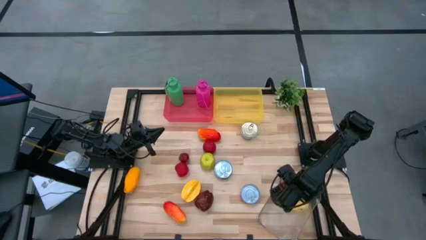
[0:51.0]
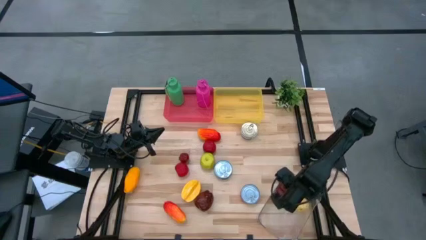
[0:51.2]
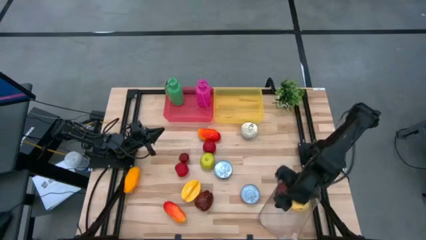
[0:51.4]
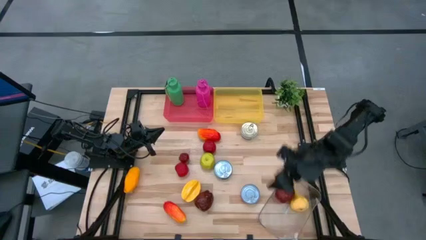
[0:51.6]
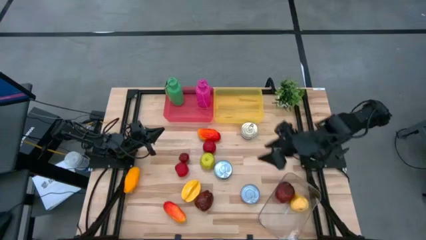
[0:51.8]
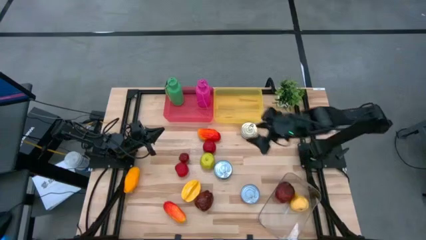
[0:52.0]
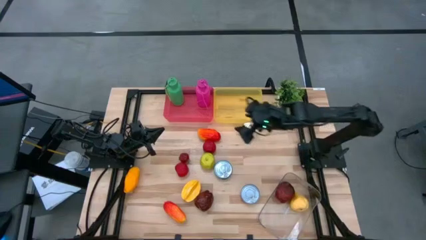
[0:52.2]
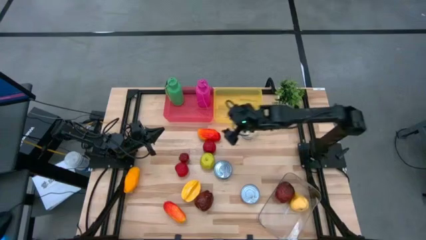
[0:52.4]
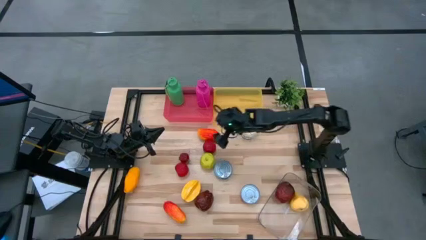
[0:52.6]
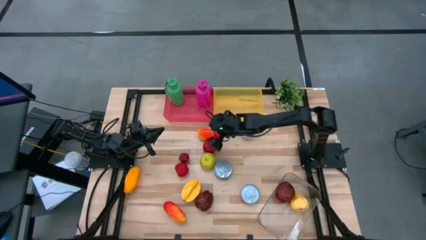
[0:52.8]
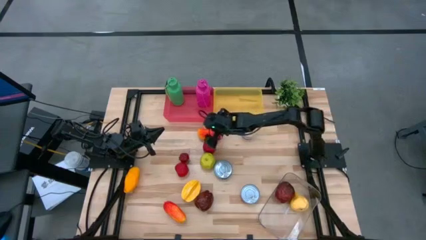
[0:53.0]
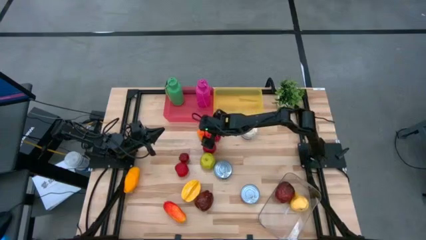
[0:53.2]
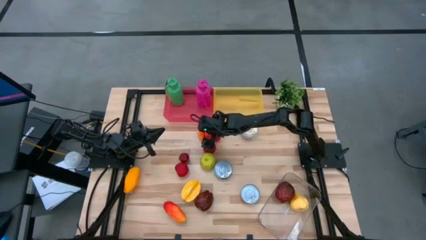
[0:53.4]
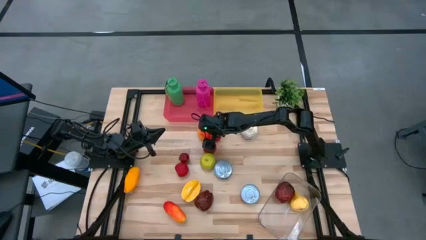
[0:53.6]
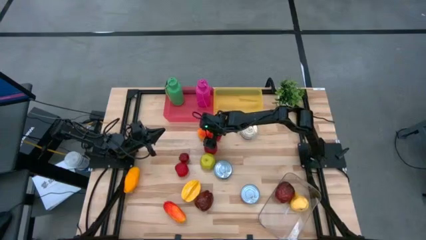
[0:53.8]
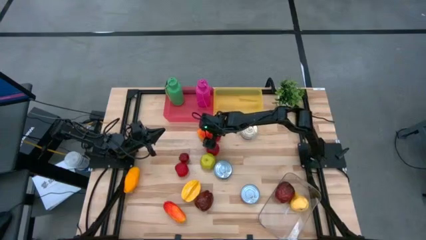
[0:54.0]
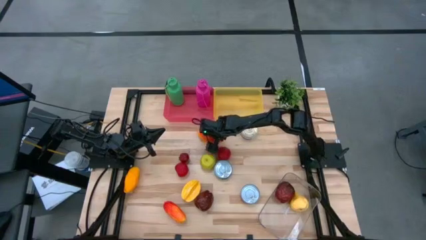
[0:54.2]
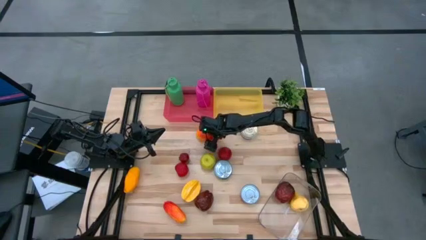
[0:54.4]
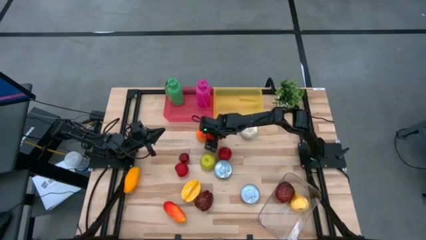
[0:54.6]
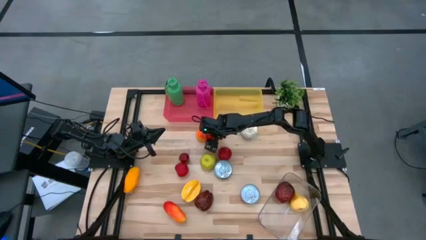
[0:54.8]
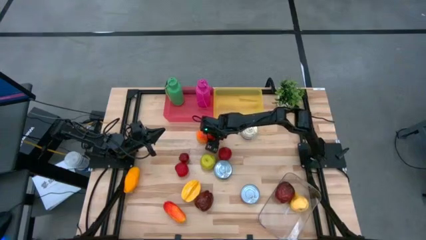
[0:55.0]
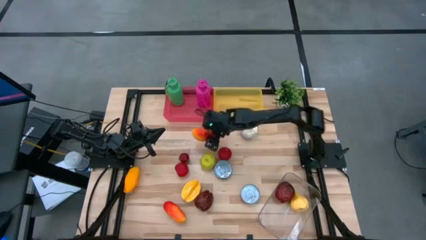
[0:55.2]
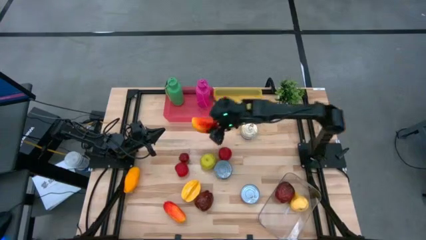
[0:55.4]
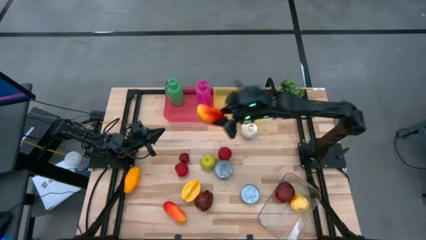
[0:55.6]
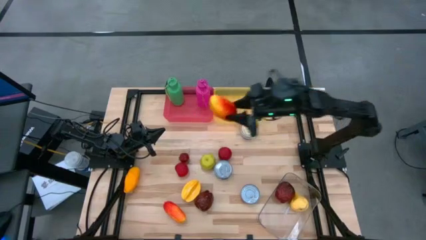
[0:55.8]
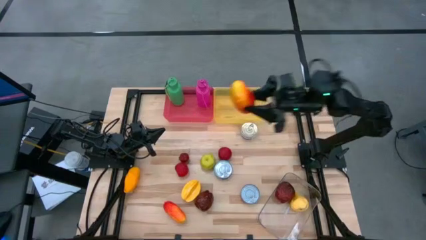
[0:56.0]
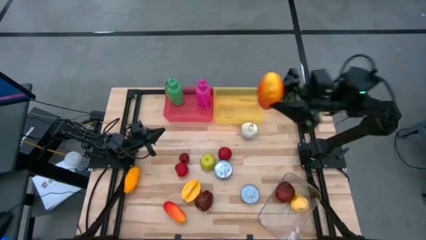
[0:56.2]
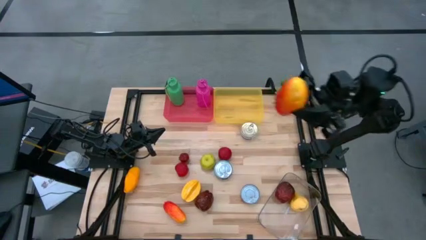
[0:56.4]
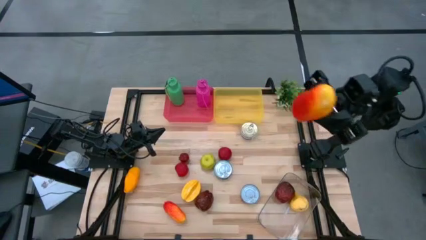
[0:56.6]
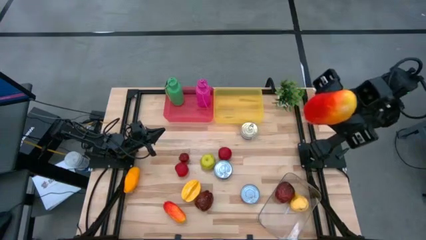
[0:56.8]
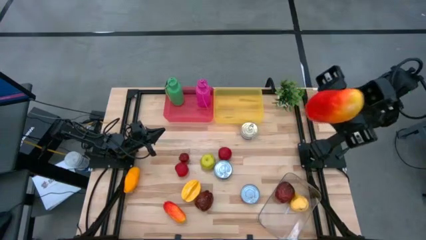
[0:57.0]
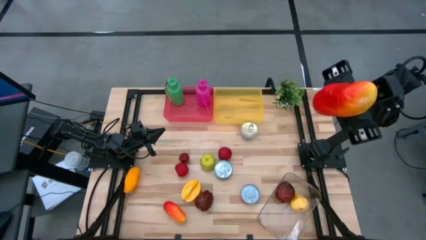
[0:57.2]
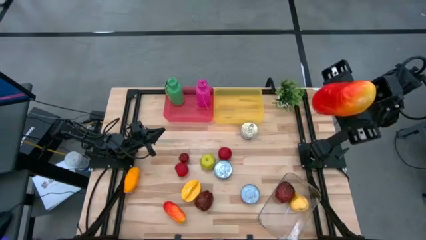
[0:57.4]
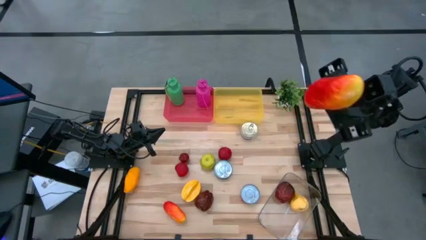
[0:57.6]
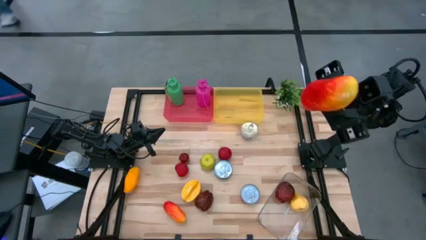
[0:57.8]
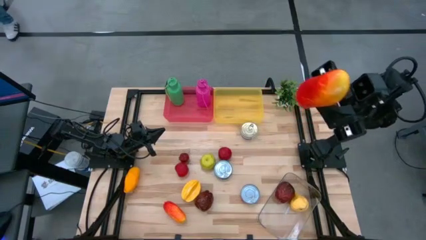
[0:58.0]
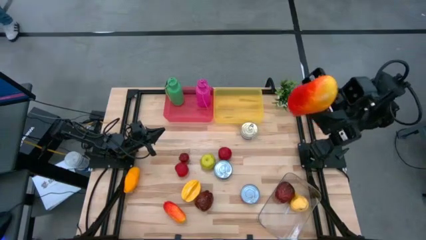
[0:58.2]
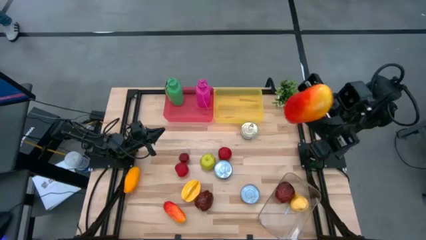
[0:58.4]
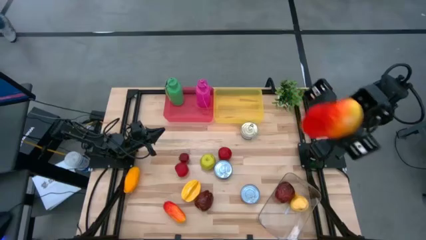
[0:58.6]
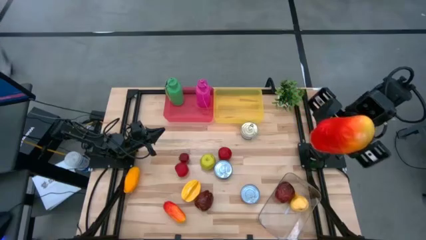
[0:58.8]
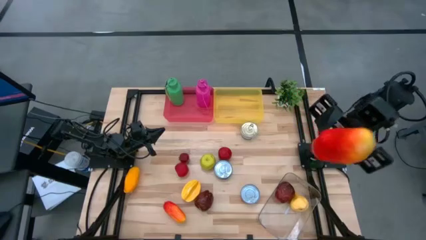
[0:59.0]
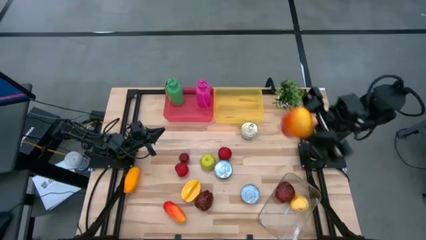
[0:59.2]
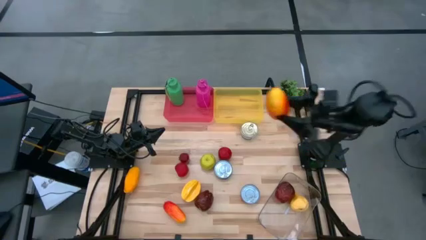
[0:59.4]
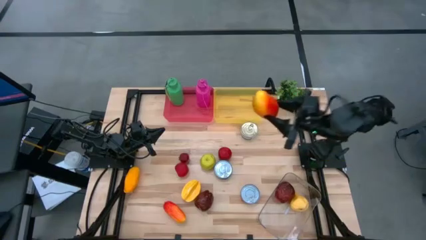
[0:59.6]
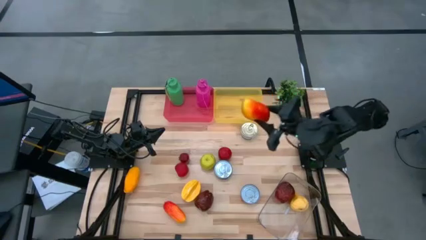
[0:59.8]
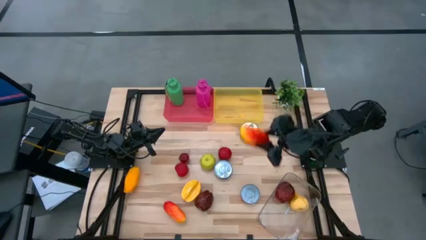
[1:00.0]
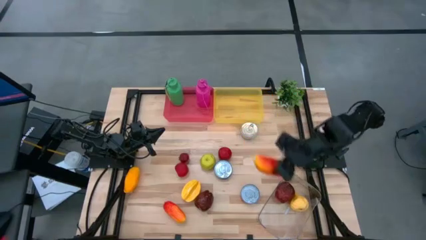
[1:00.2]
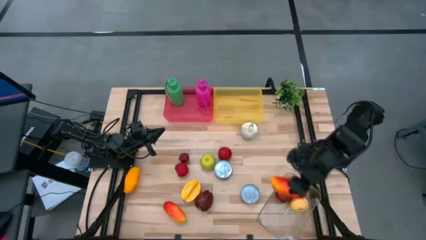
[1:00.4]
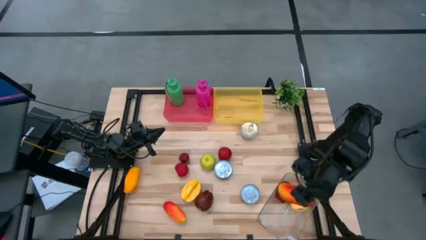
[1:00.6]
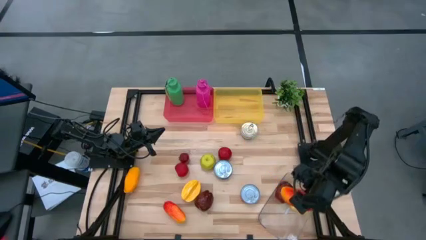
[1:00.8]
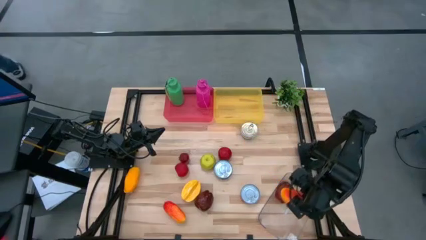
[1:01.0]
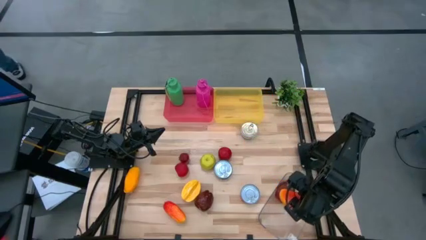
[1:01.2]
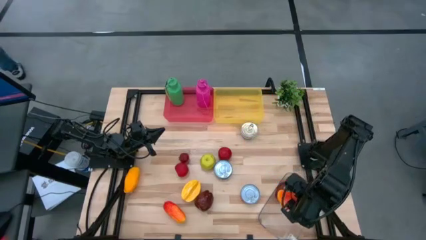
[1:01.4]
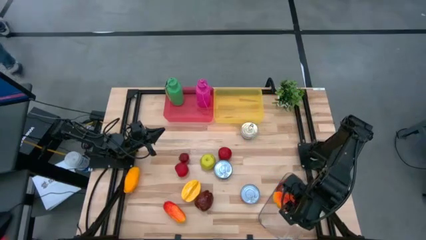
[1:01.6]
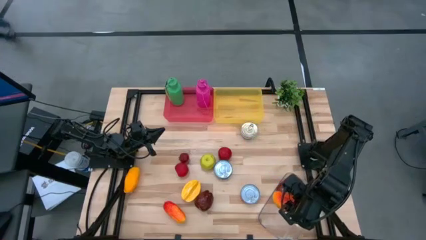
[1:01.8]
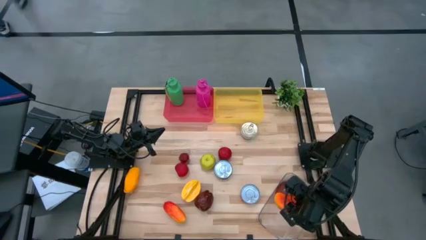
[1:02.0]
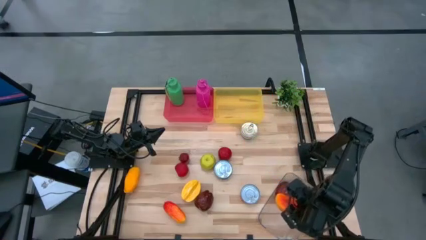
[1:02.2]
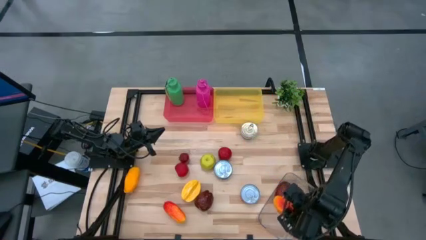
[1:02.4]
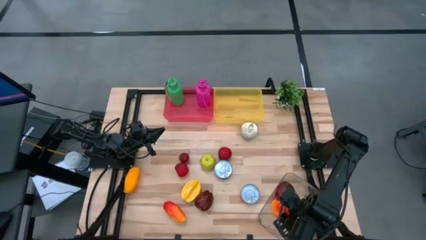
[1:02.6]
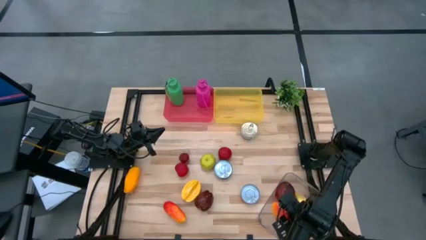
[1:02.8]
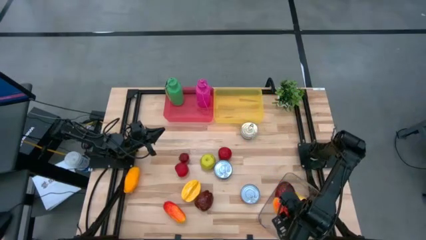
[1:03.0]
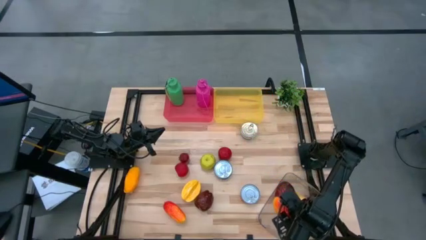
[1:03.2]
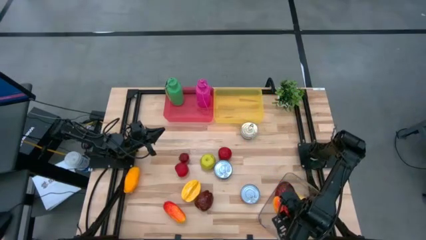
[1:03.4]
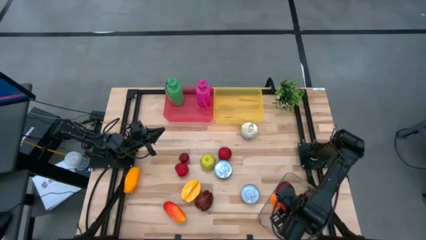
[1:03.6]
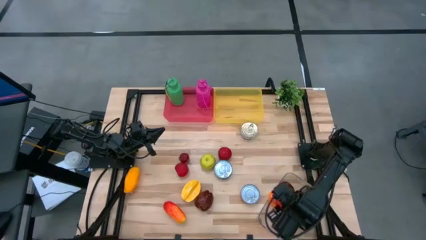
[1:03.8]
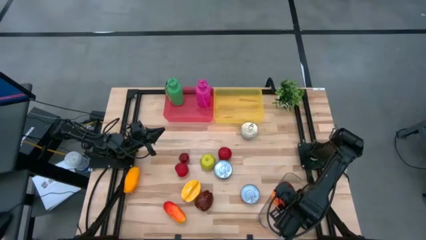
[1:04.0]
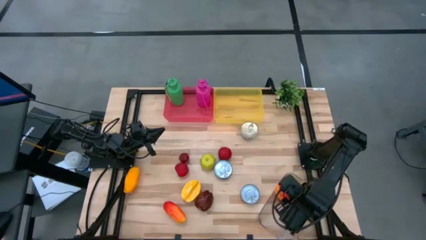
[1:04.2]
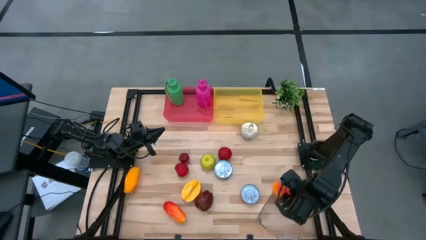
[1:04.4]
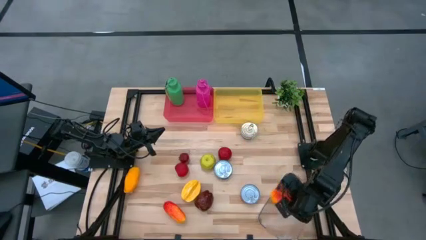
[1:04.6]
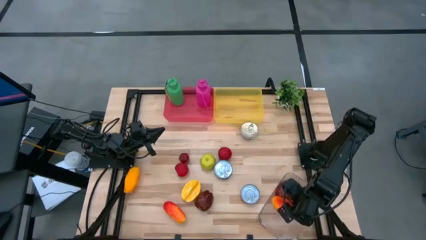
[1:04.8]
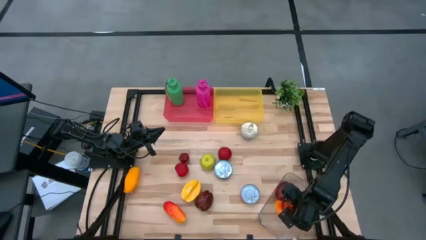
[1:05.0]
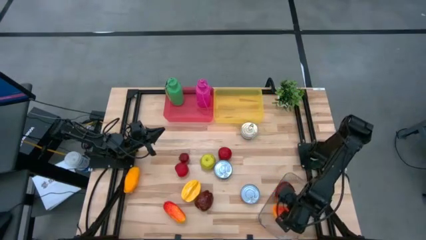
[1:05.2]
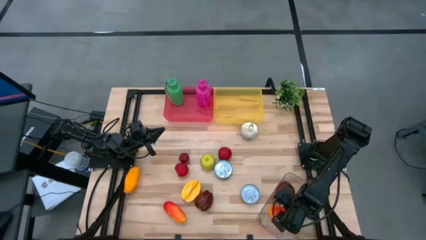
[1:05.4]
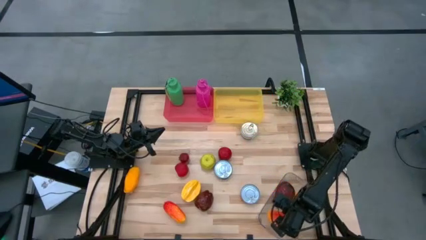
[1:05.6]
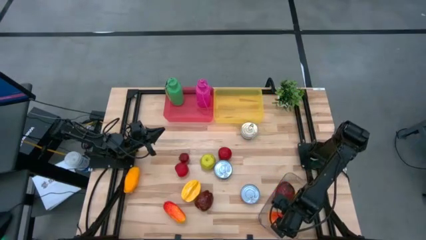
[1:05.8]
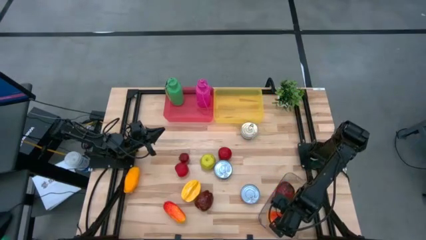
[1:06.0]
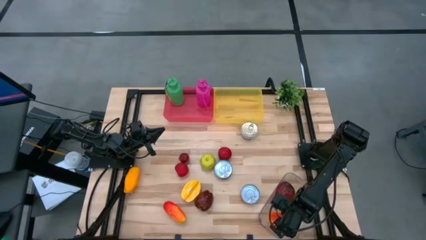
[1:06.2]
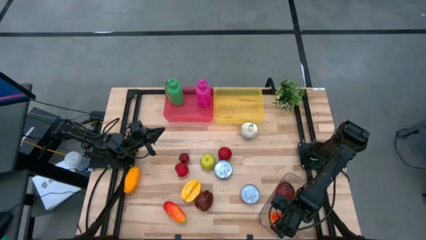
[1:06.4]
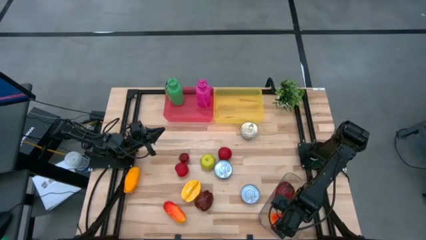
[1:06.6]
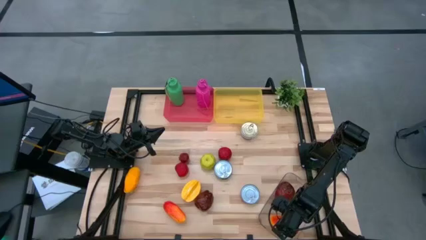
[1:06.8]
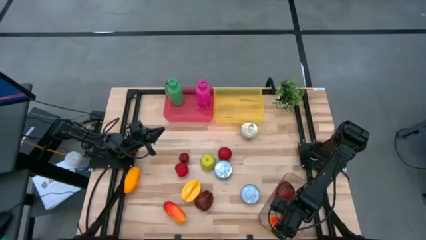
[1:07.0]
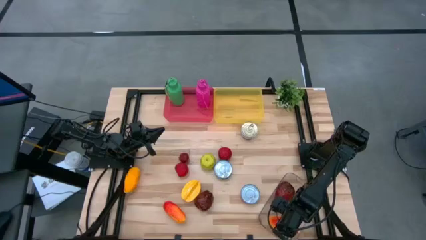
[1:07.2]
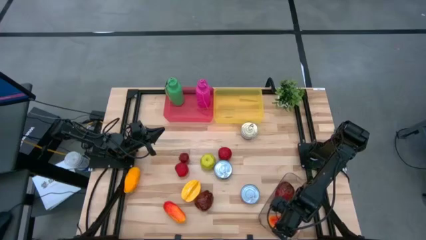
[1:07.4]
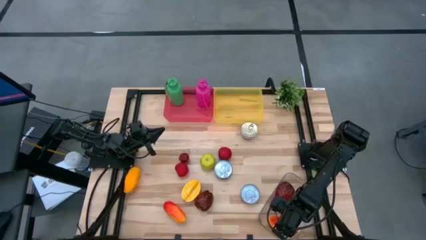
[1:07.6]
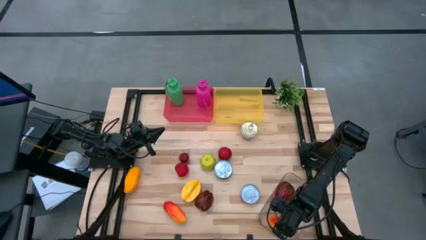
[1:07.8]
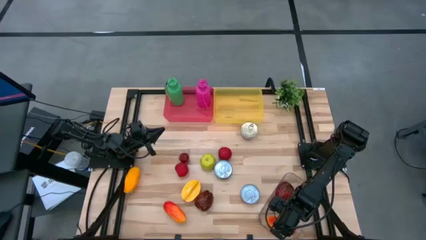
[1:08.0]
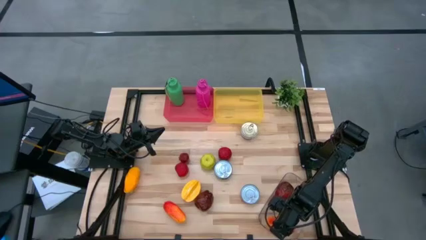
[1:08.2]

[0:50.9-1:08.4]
Task: Pick & Place Food Item
Put the top mango into the transparent bin
